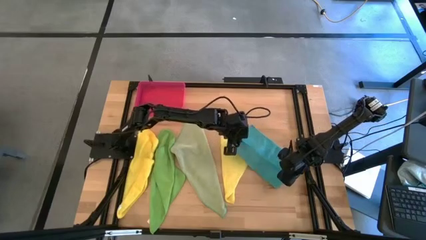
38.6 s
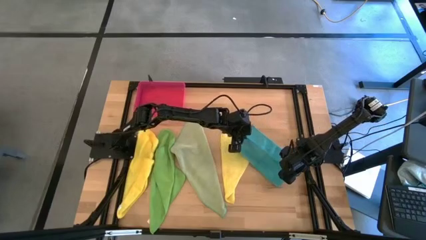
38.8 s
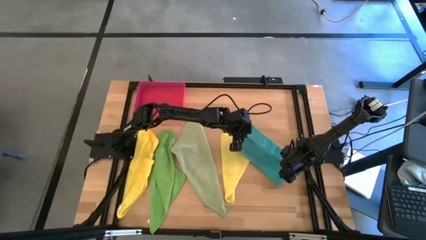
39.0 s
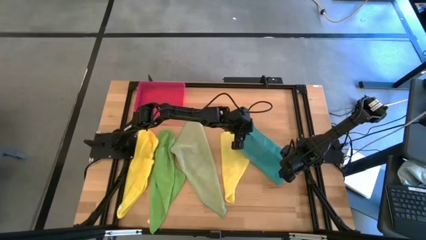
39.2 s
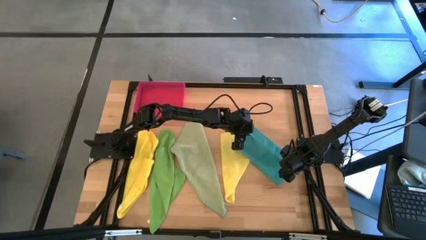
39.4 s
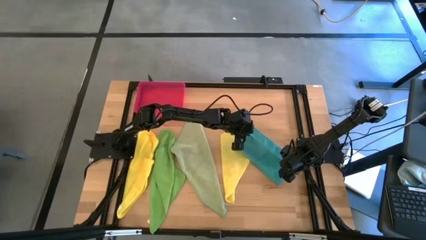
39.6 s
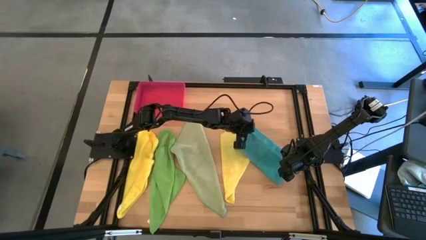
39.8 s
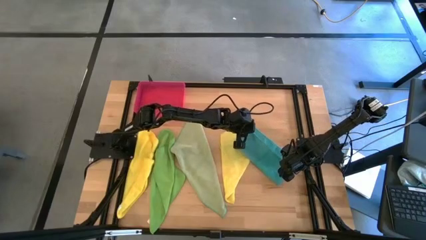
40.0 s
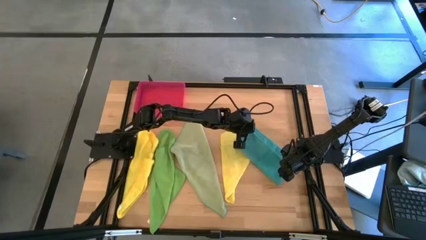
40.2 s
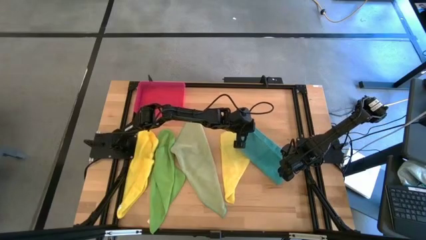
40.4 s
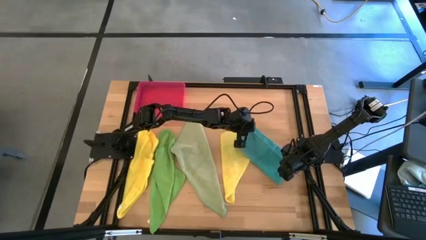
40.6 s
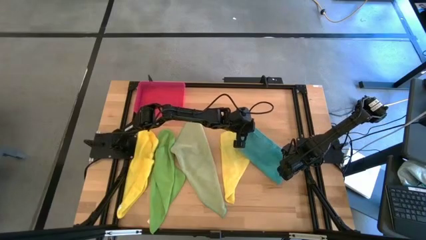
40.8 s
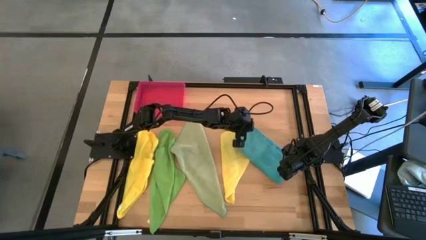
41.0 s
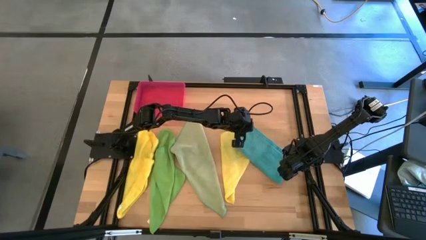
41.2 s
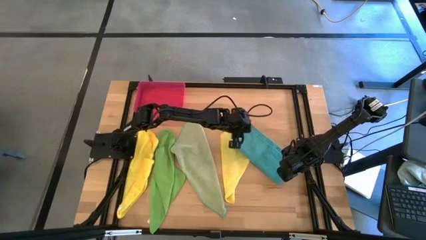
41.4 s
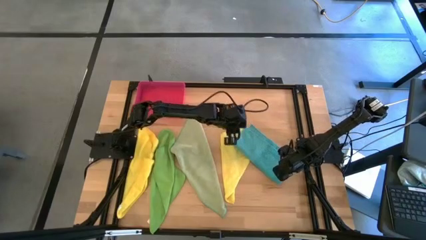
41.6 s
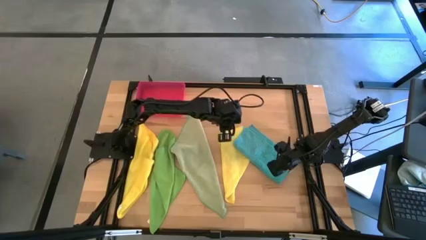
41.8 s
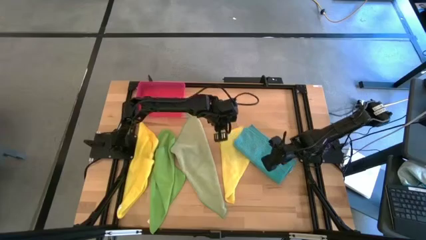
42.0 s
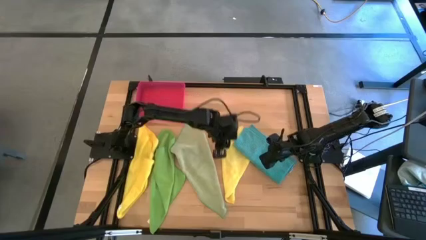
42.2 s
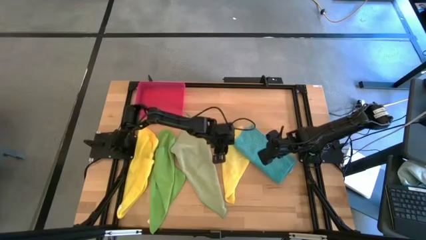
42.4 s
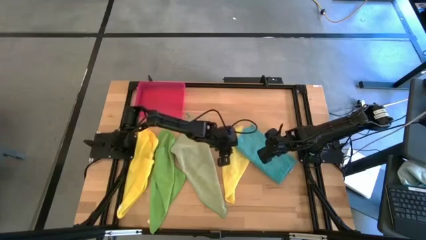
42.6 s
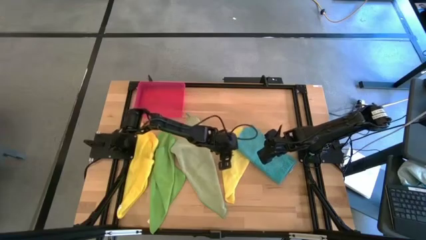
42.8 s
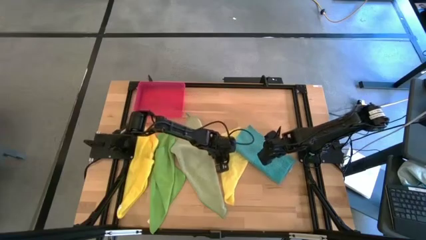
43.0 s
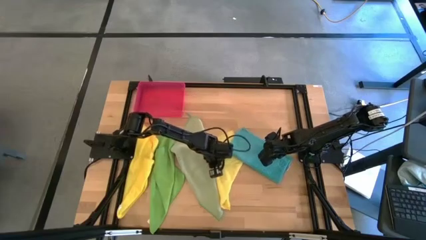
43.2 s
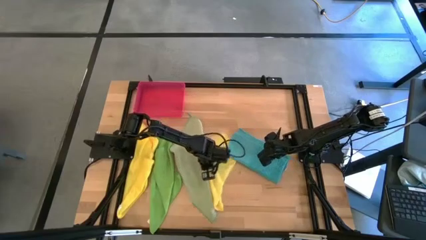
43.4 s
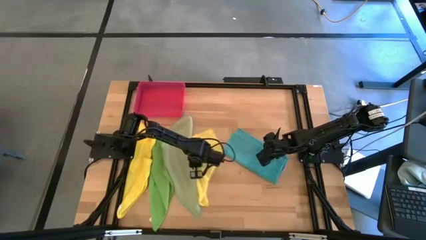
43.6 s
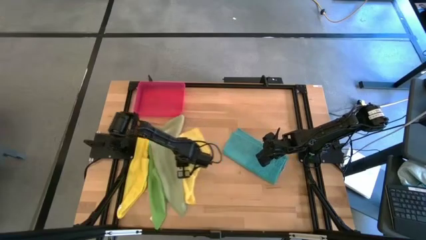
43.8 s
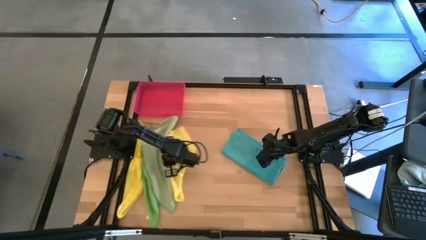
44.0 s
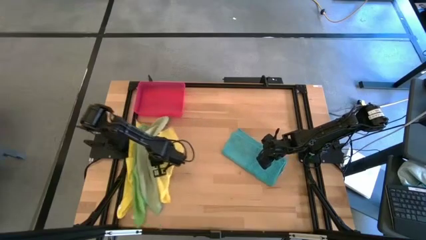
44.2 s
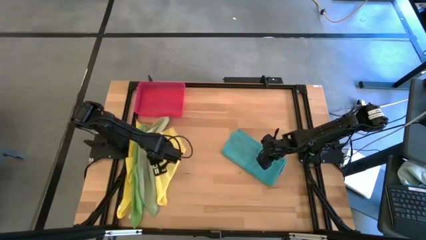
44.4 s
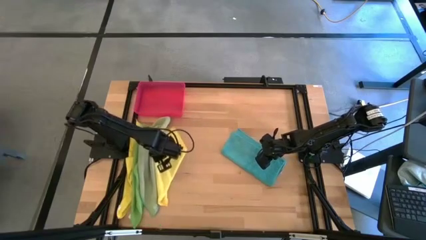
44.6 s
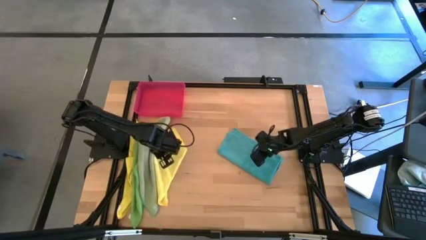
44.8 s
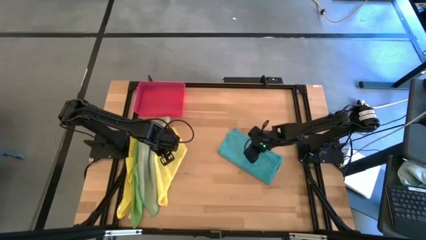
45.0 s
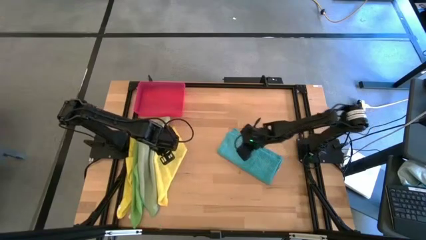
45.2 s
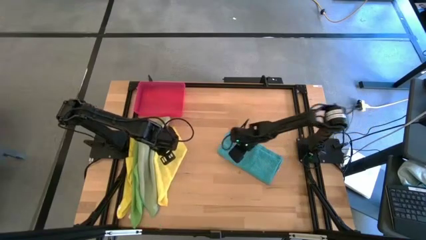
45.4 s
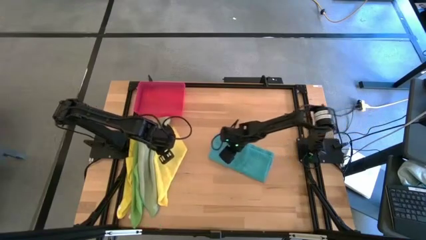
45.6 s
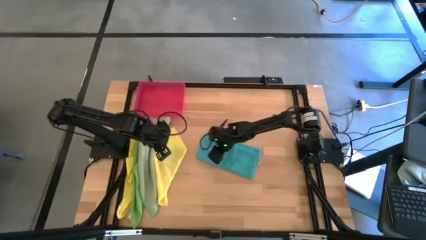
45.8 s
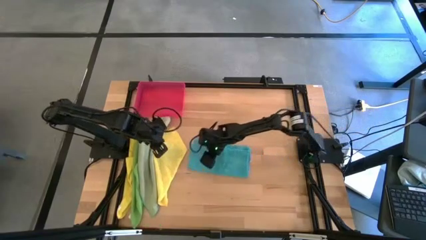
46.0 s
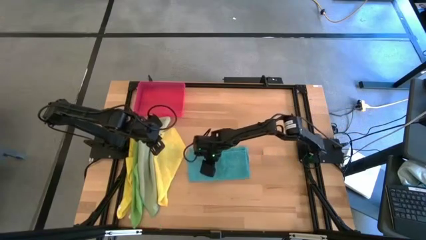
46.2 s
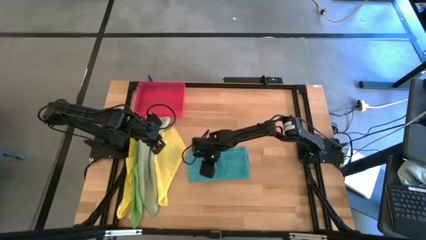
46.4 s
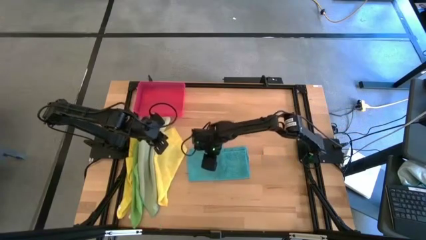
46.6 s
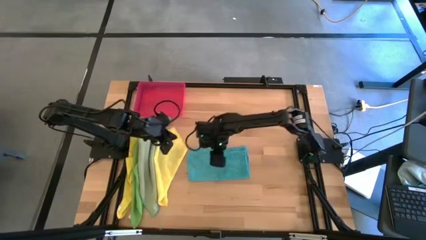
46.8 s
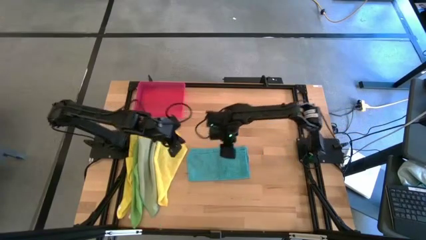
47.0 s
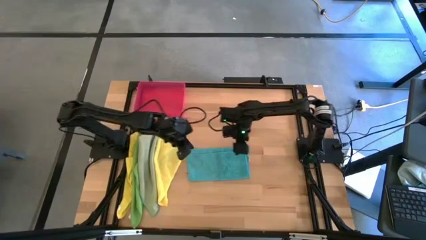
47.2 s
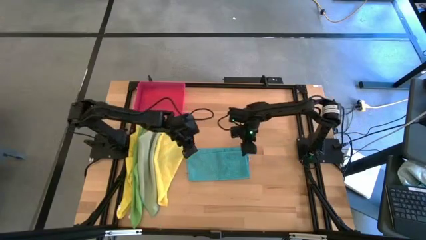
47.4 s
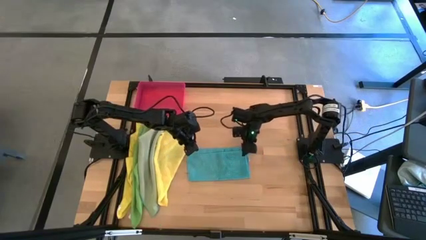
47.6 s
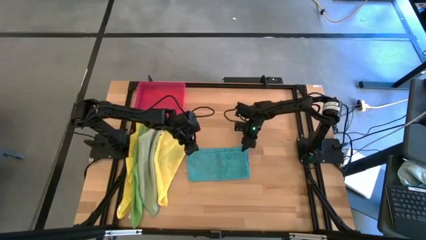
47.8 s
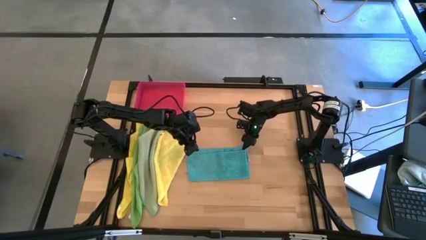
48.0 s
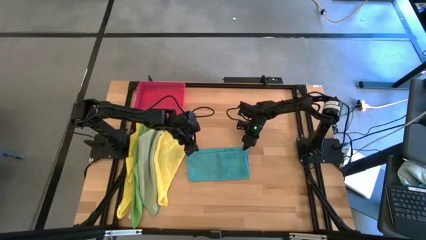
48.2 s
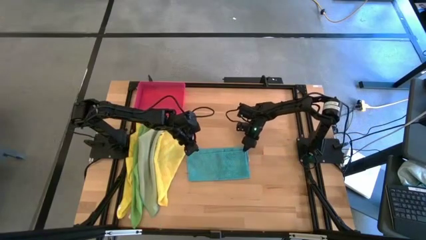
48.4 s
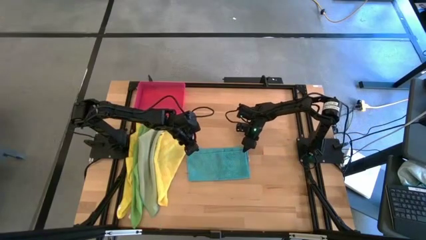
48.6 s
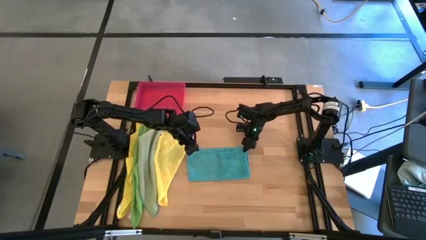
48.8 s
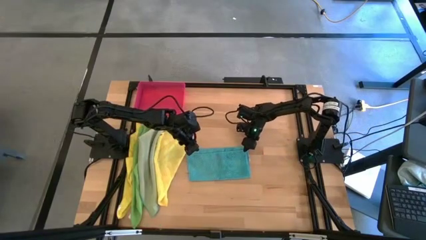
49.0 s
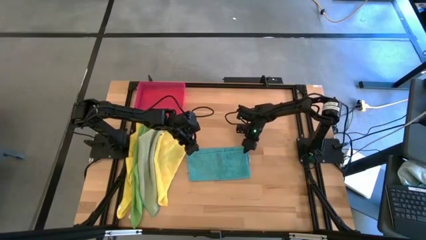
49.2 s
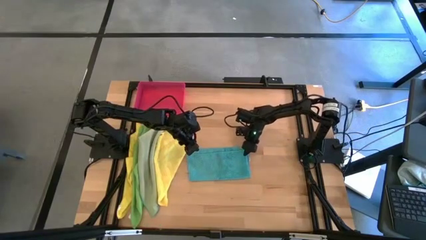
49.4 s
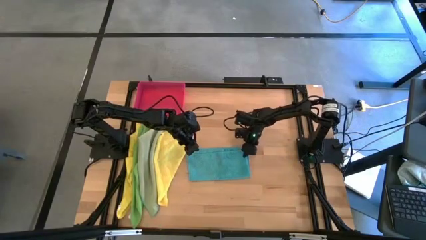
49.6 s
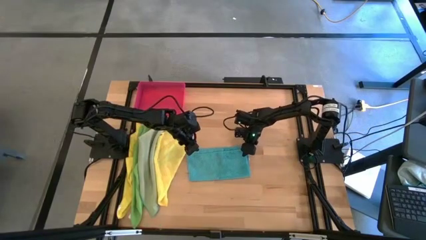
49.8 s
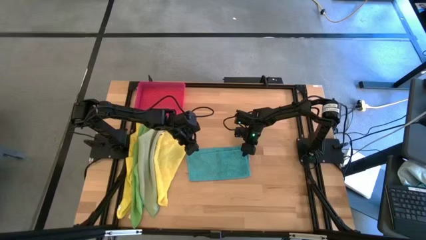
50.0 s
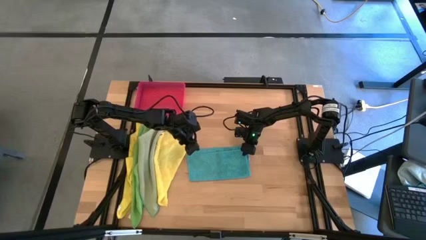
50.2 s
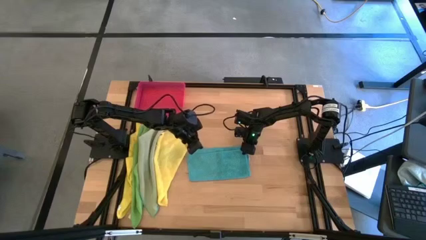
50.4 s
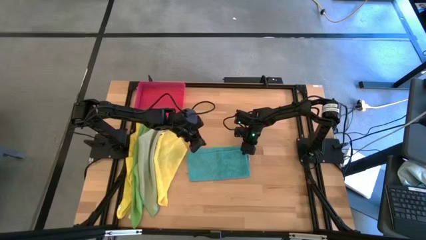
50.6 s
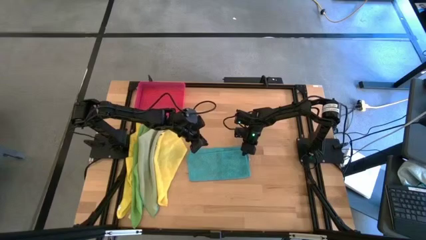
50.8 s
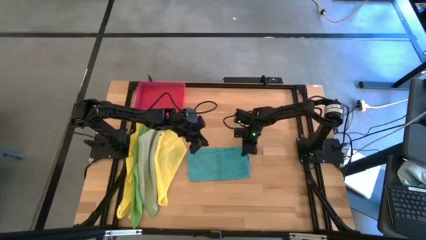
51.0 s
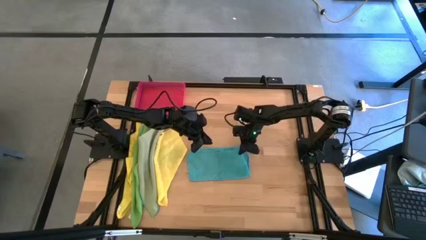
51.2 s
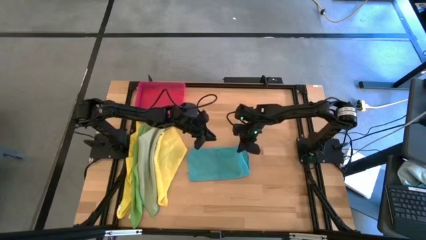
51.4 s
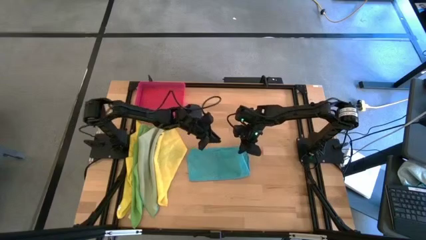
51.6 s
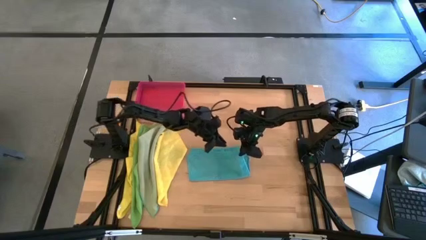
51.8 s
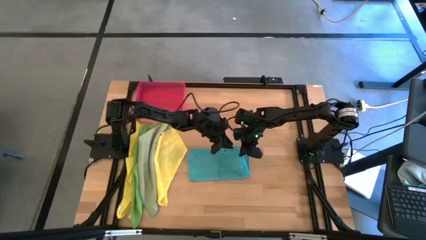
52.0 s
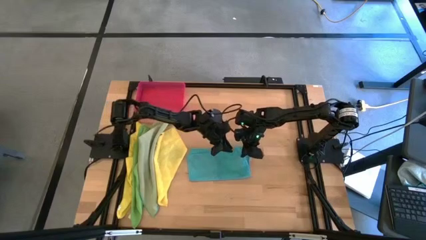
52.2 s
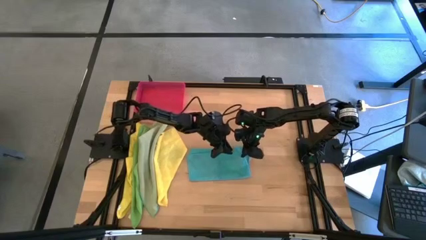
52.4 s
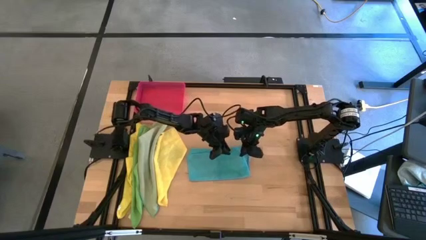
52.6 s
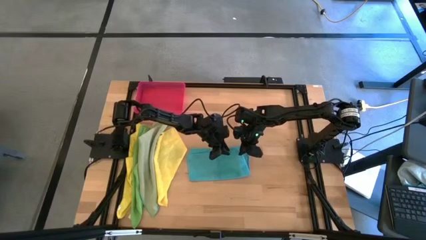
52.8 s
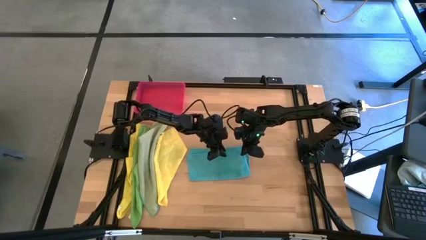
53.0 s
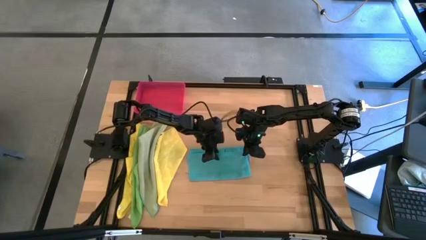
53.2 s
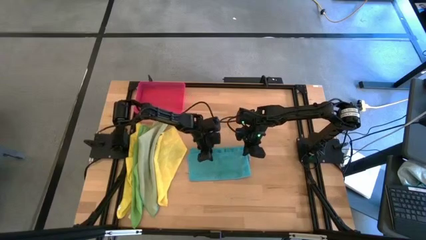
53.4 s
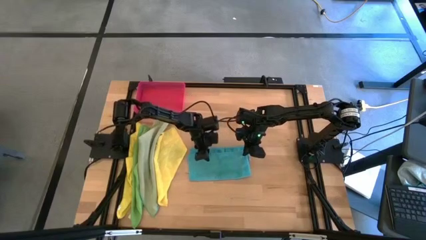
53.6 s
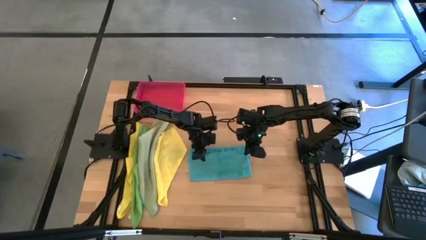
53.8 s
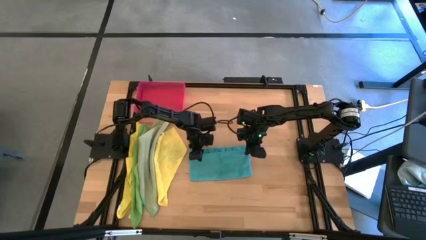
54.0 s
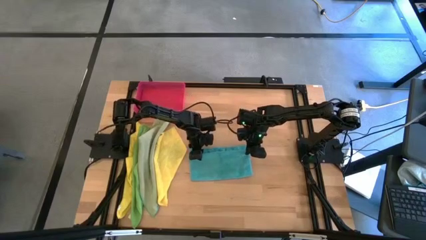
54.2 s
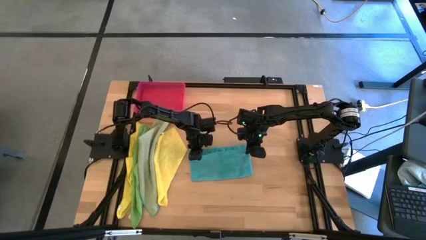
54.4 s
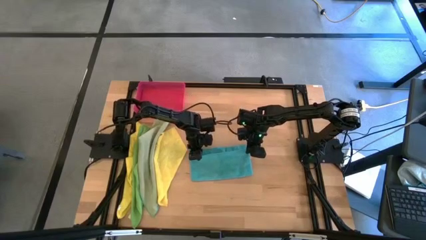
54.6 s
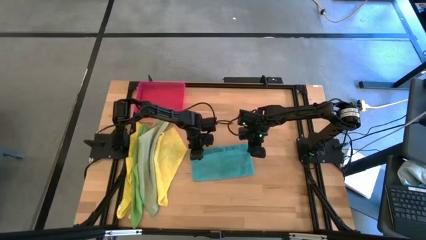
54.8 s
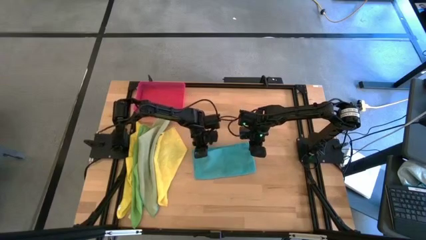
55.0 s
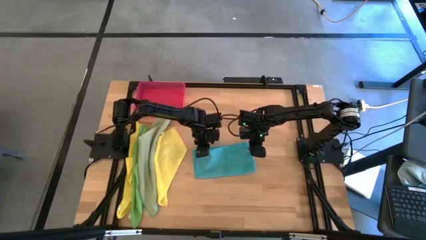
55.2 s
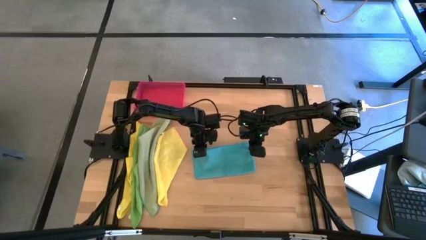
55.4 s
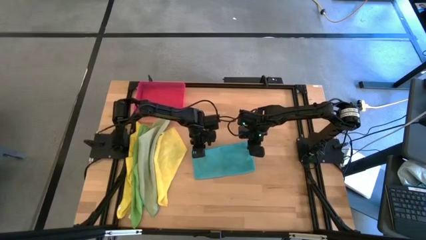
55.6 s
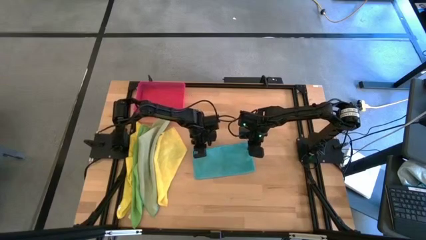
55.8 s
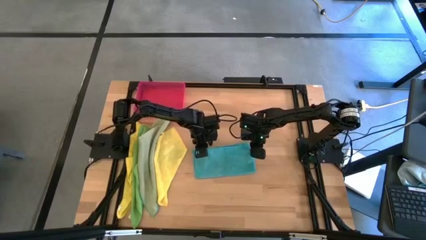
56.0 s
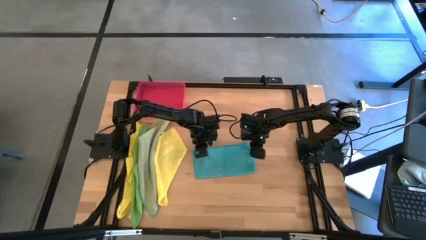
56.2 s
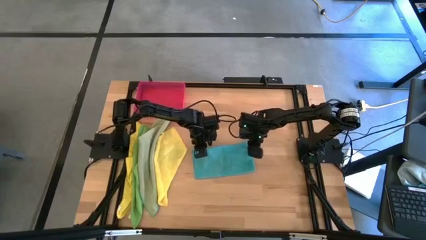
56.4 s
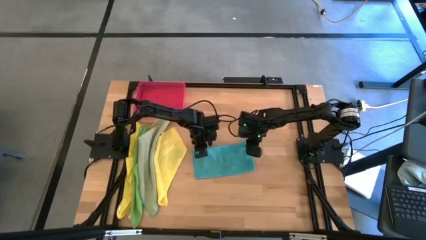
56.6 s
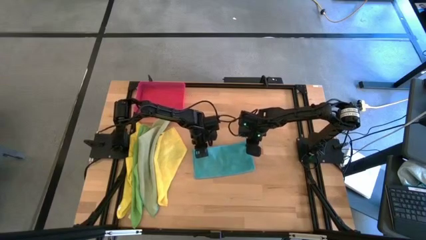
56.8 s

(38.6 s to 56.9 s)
Task: Fold microfiber towels
Fold the blue microfiber towel
